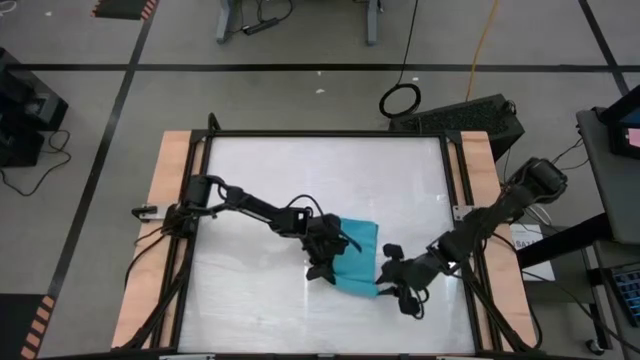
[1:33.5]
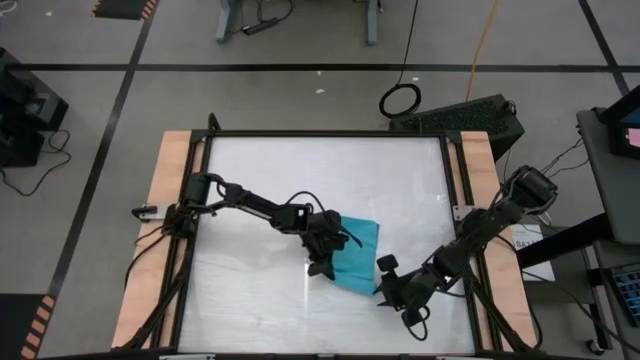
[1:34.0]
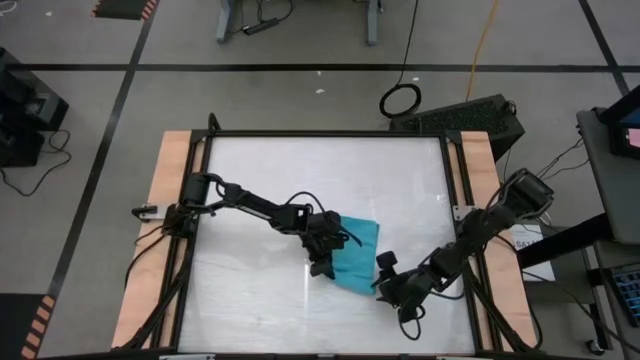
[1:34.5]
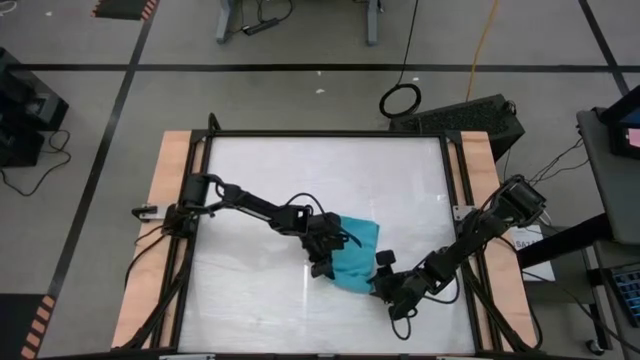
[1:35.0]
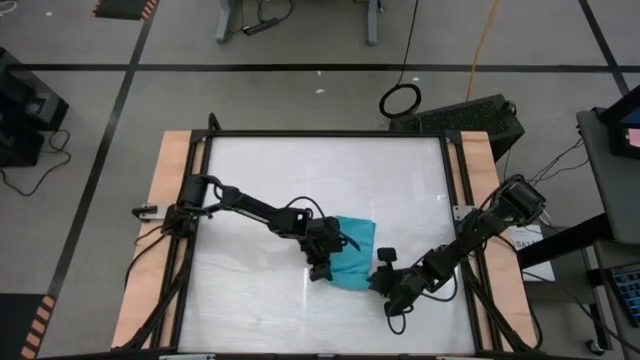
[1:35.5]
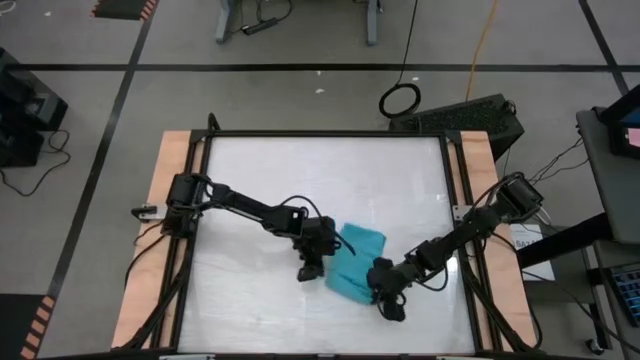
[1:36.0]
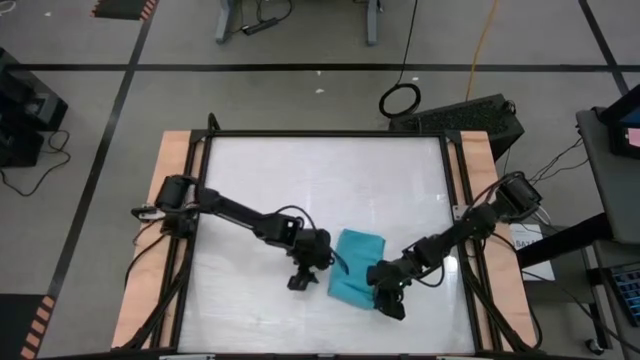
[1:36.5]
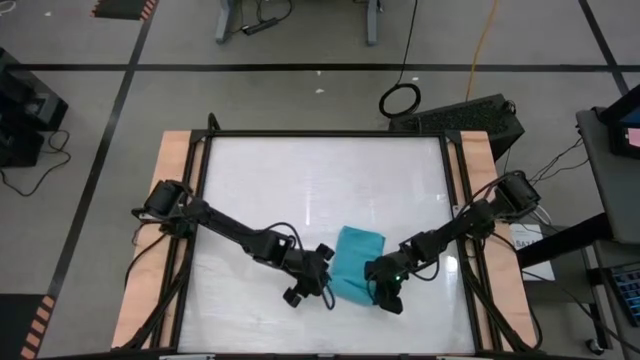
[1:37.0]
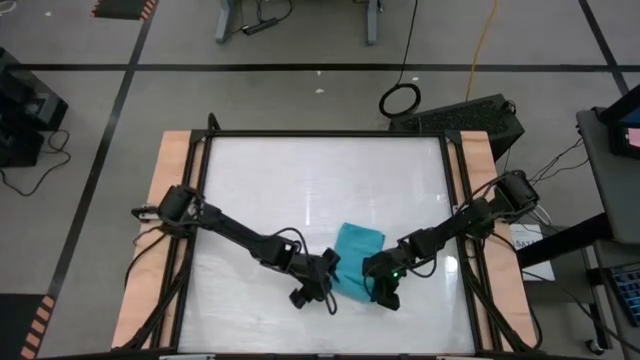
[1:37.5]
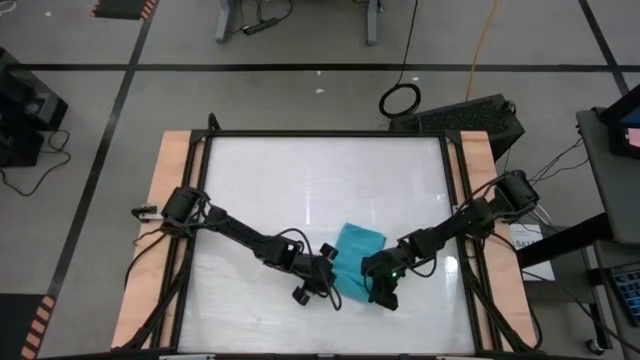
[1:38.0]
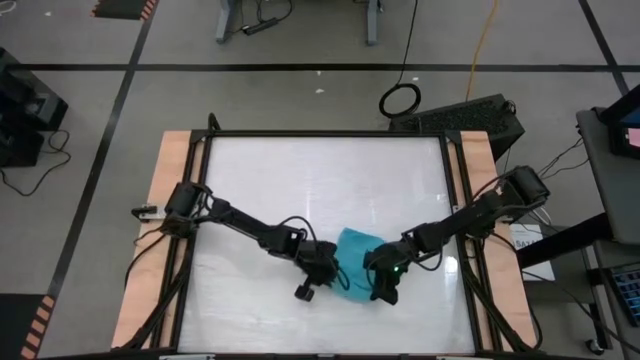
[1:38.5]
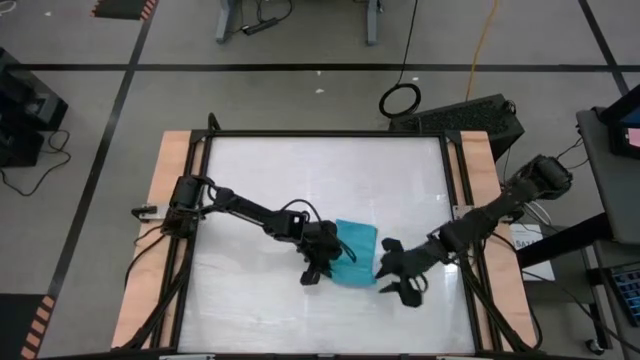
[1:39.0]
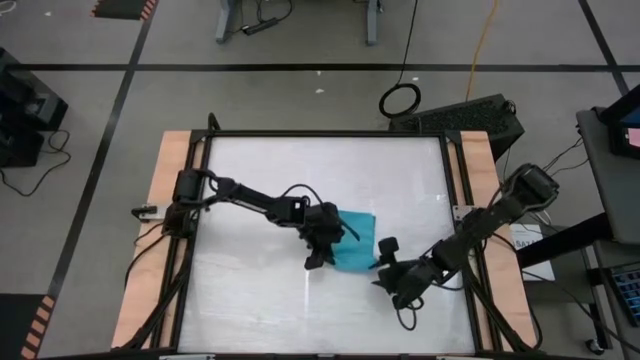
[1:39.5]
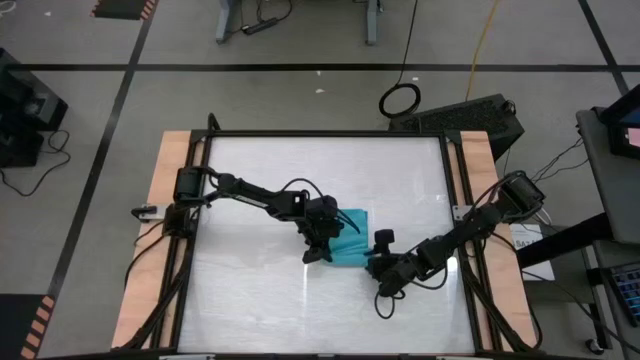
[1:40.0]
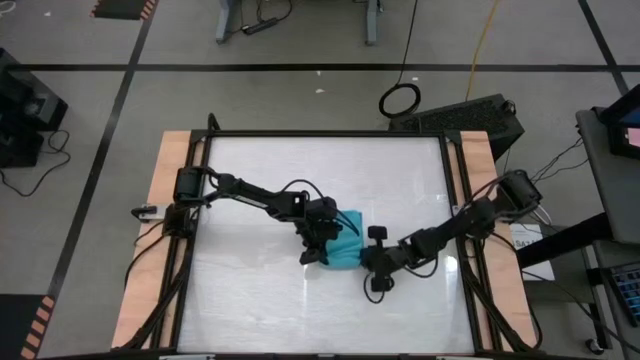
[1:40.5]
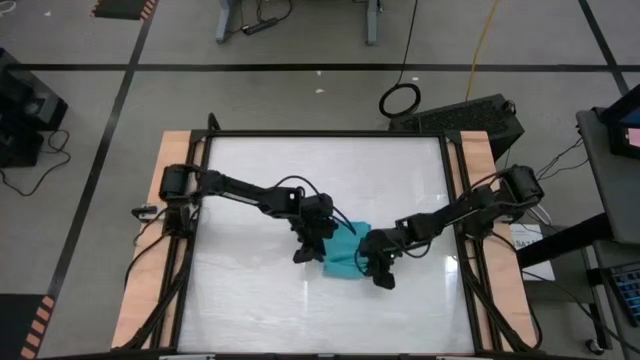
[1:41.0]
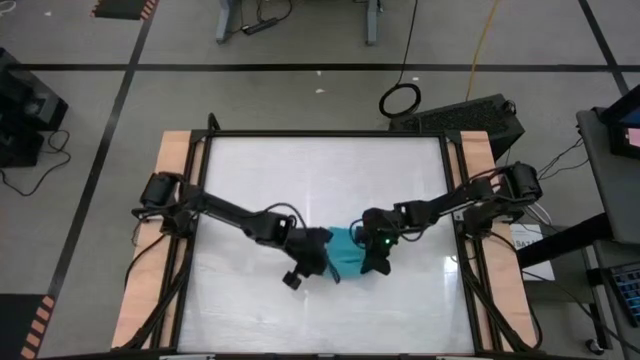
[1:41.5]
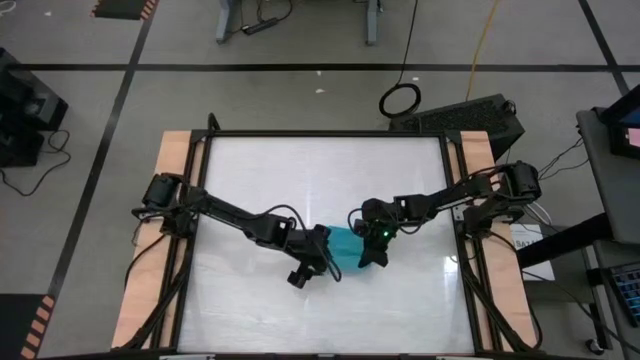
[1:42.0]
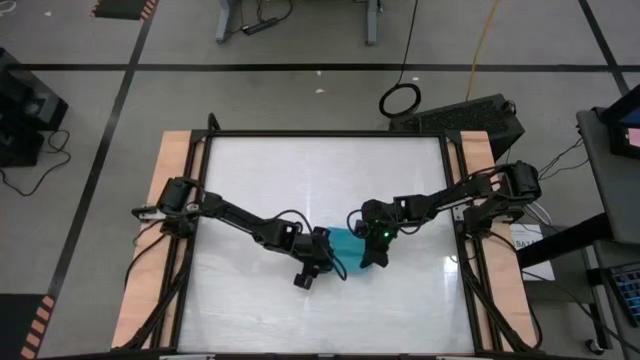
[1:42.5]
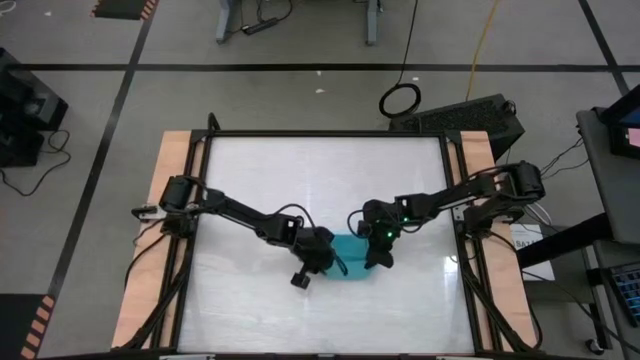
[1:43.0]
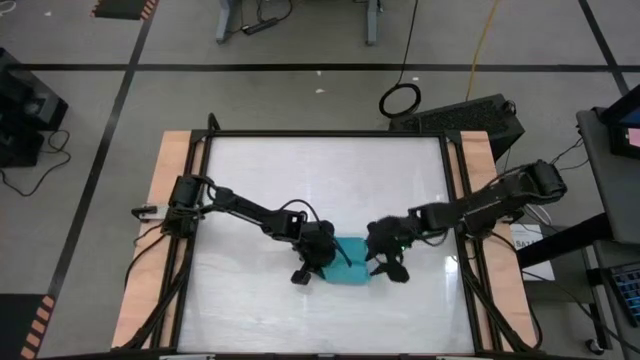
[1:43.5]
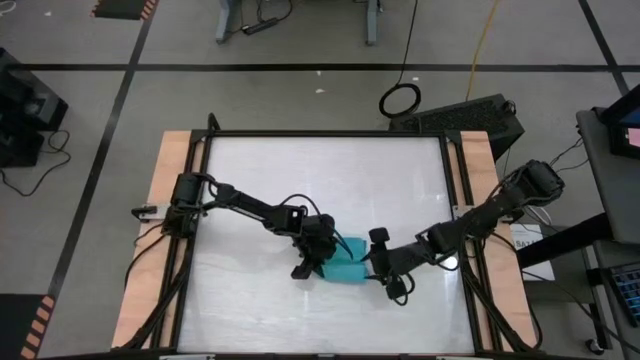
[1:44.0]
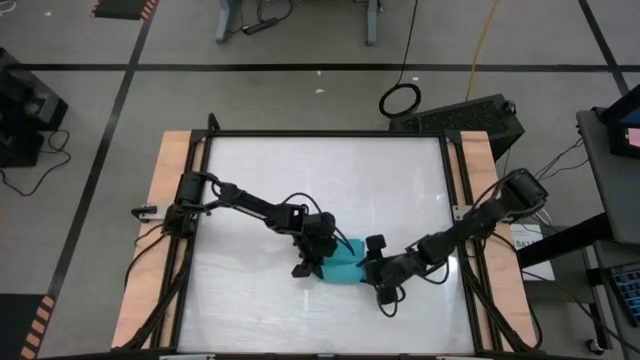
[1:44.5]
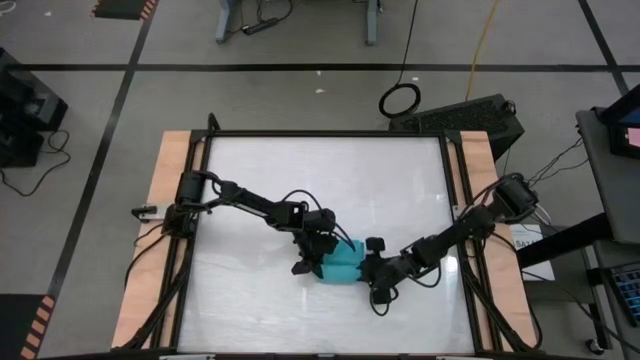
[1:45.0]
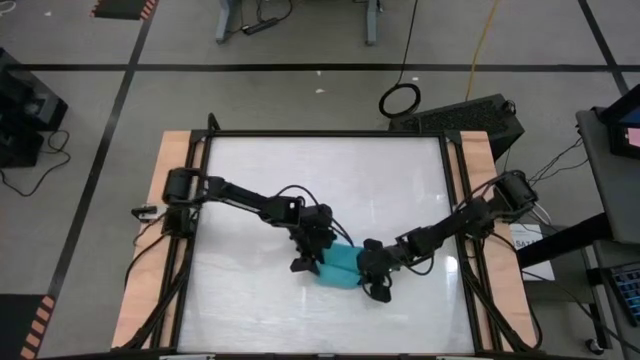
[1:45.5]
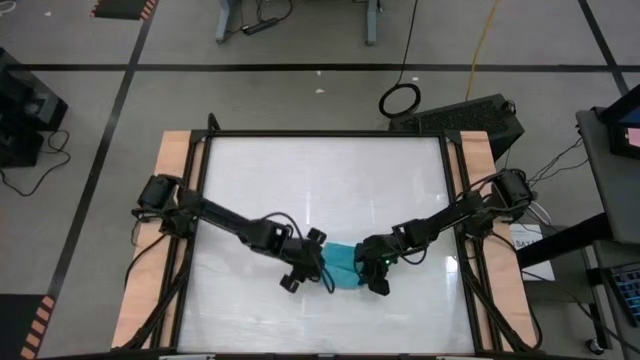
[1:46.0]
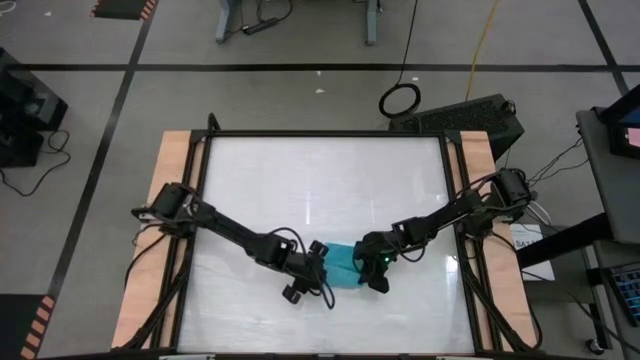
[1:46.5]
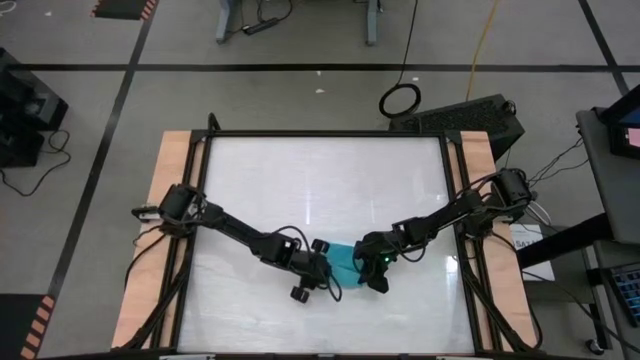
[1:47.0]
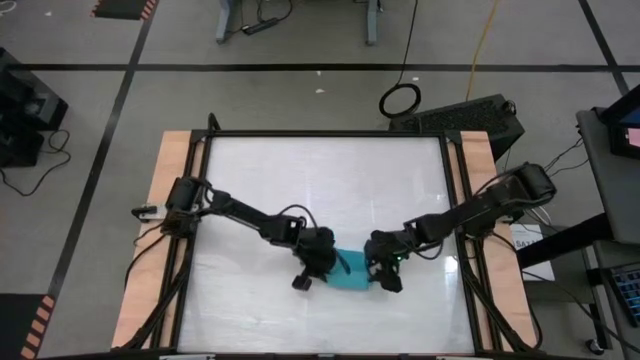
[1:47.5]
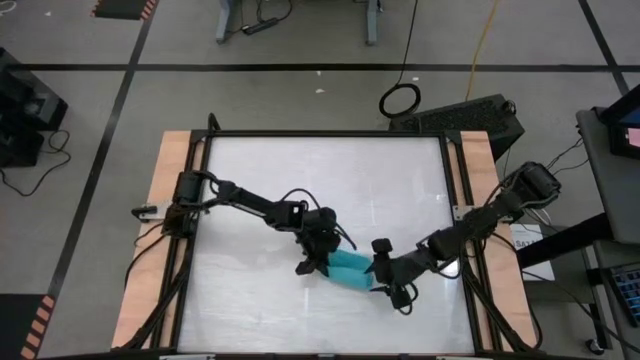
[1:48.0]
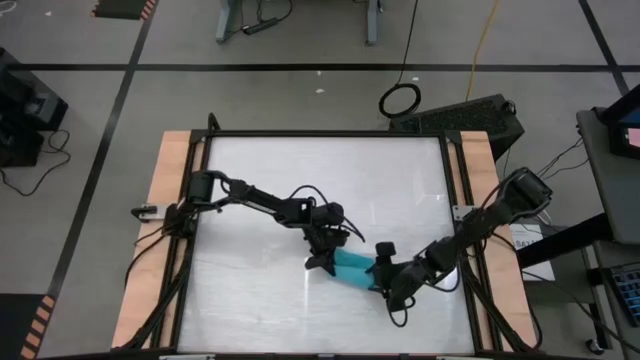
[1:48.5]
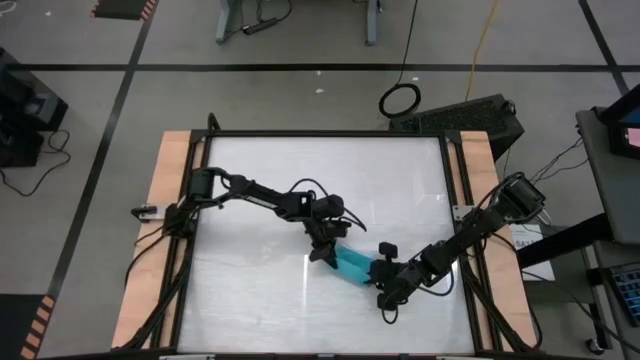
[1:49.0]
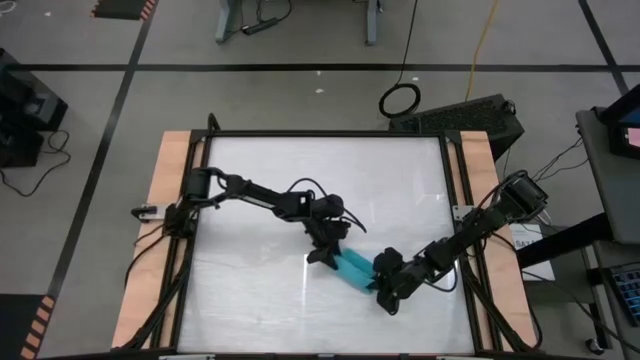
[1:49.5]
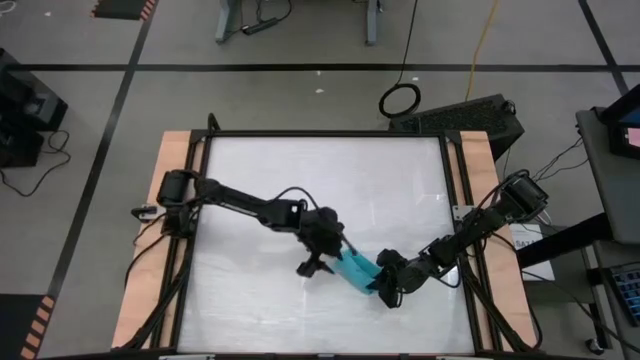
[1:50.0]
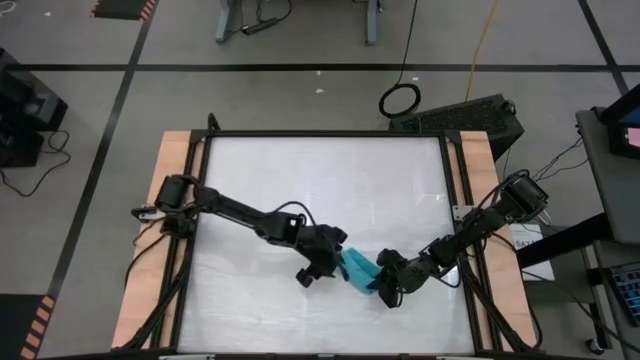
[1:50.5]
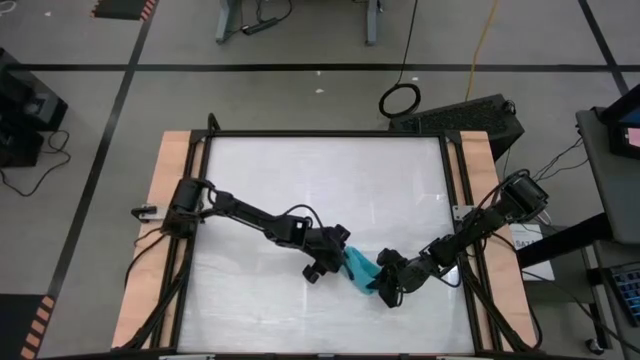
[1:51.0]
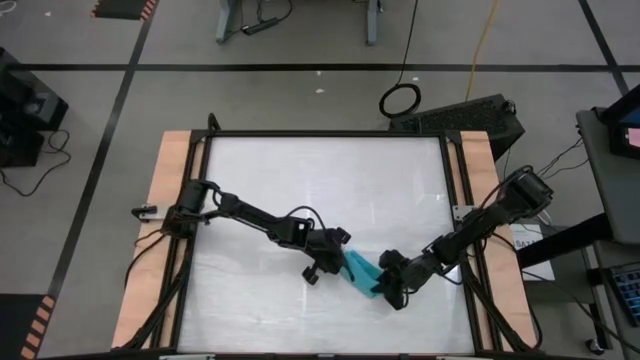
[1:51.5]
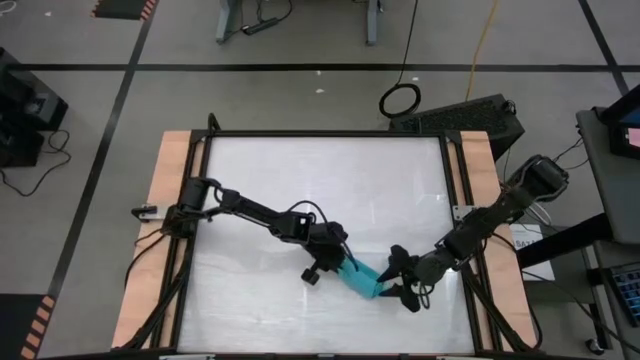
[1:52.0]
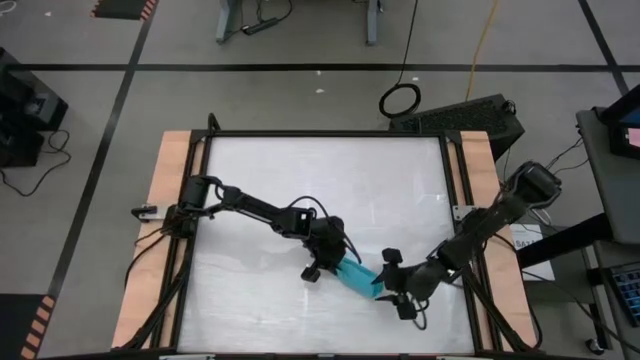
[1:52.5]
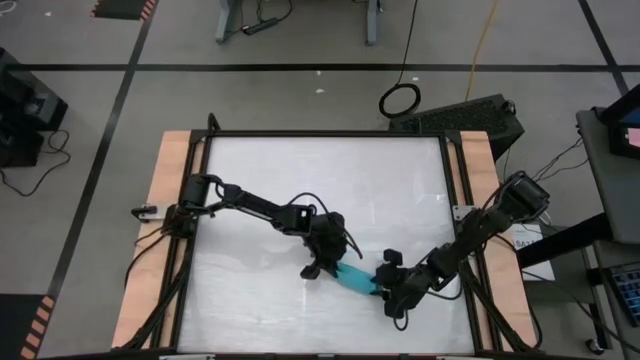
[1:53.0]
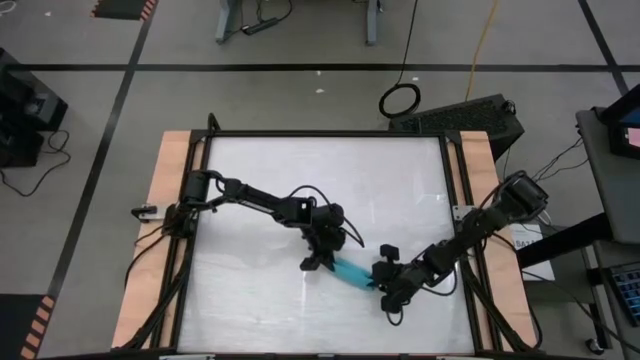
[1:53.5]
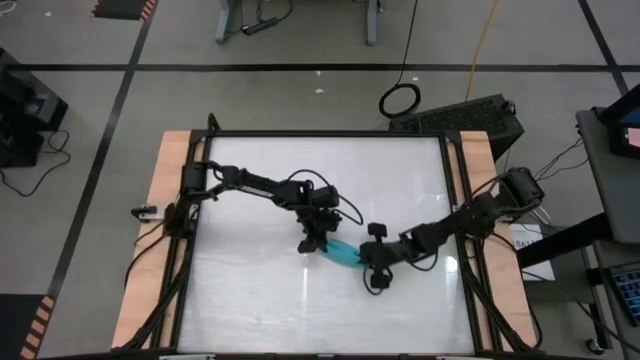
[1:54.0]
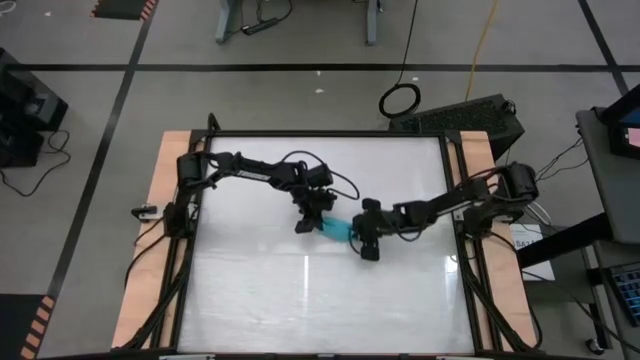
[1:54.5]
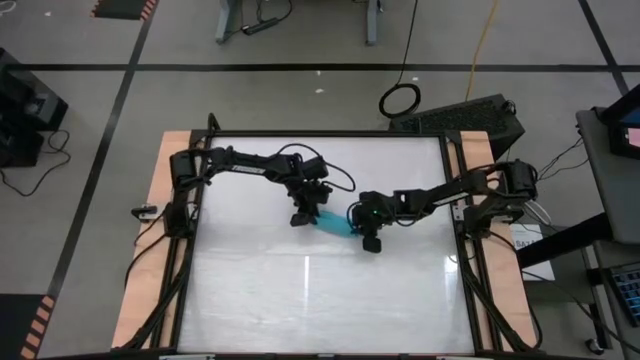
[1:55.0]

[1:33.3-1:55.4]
Task: Roll towel
Roll the blue towel
